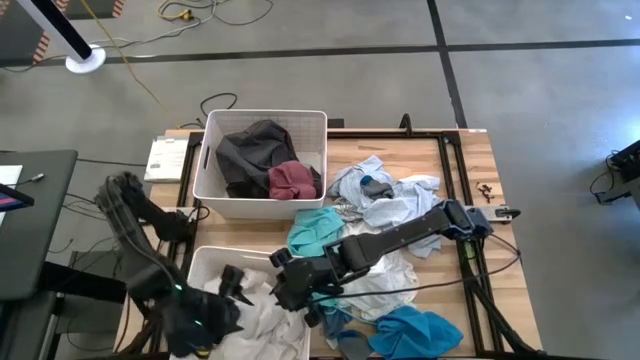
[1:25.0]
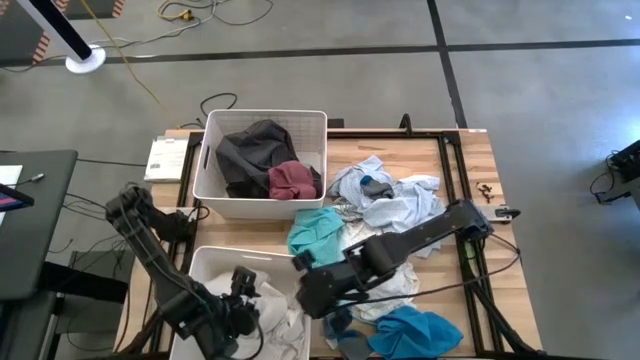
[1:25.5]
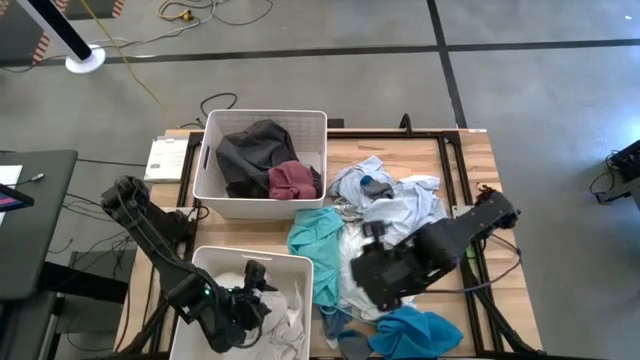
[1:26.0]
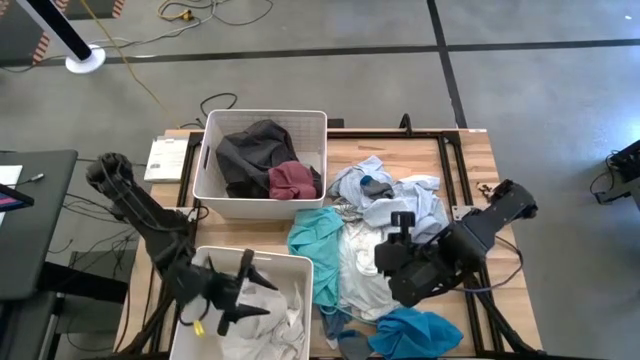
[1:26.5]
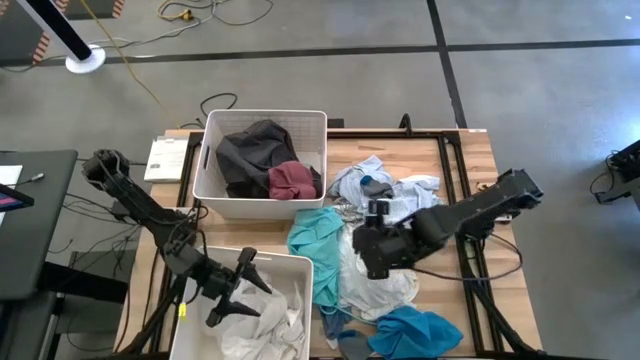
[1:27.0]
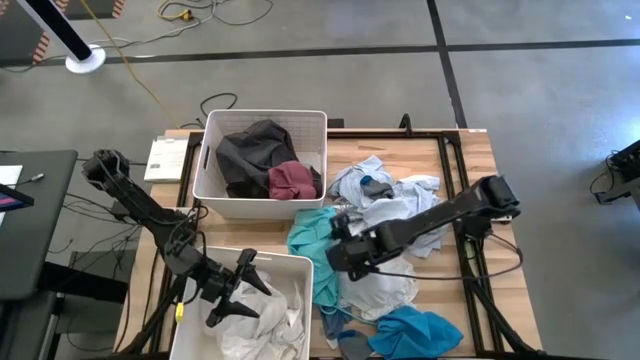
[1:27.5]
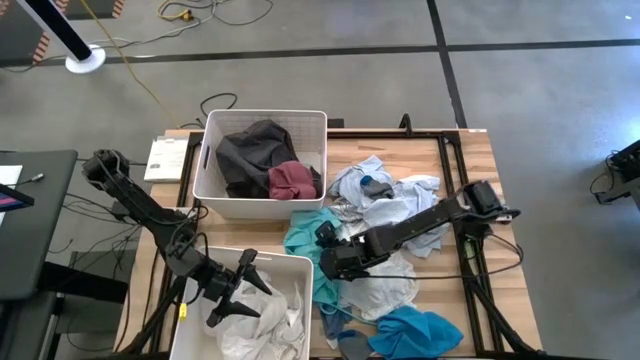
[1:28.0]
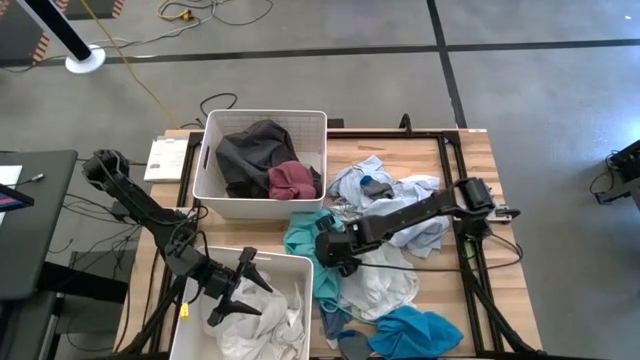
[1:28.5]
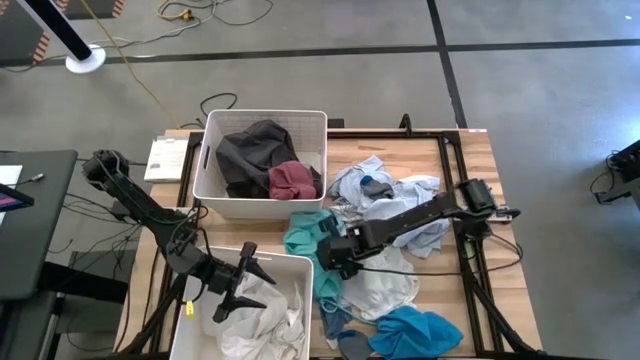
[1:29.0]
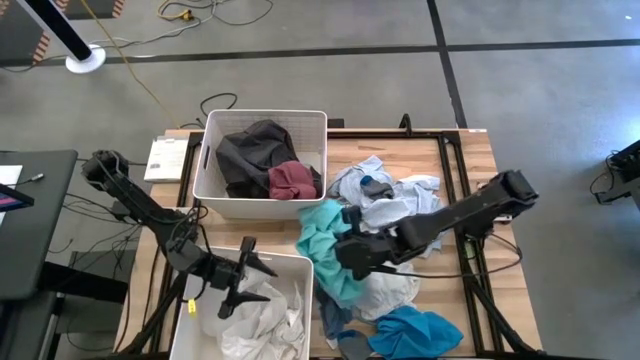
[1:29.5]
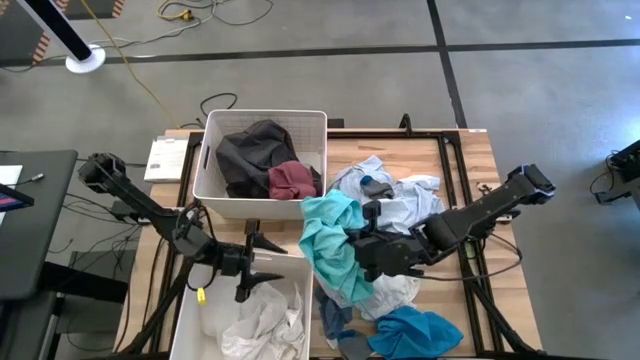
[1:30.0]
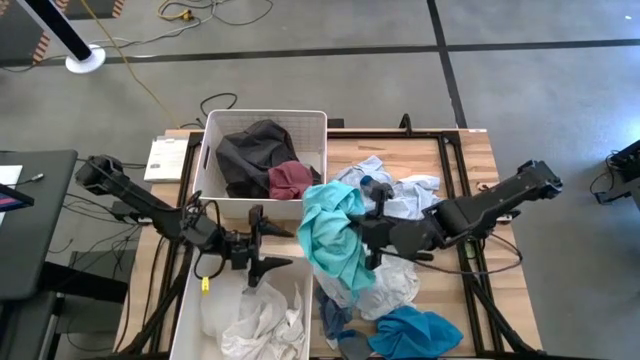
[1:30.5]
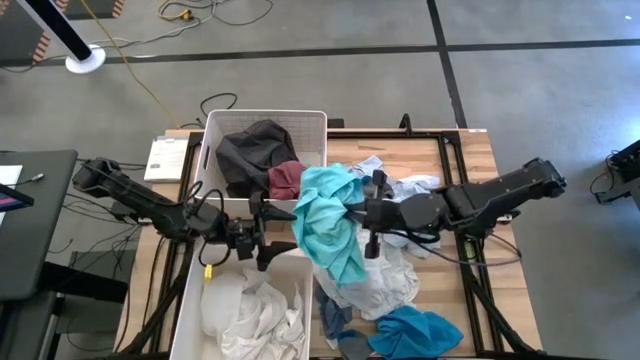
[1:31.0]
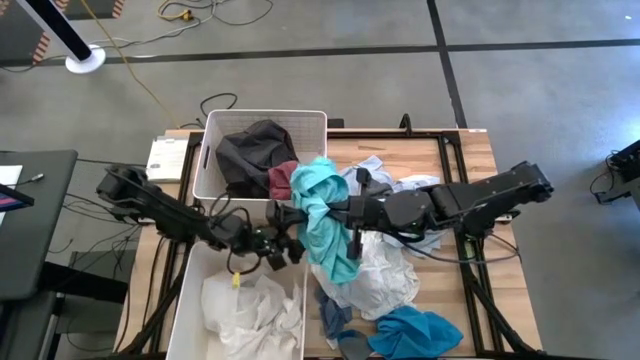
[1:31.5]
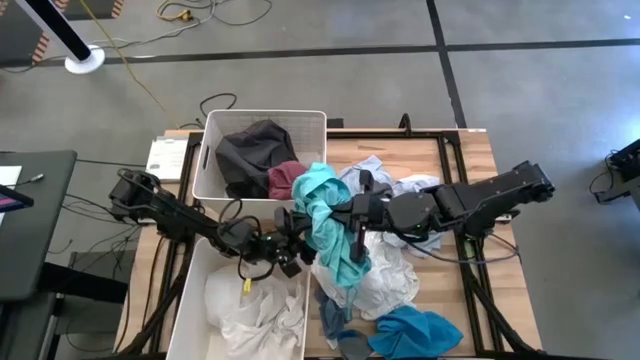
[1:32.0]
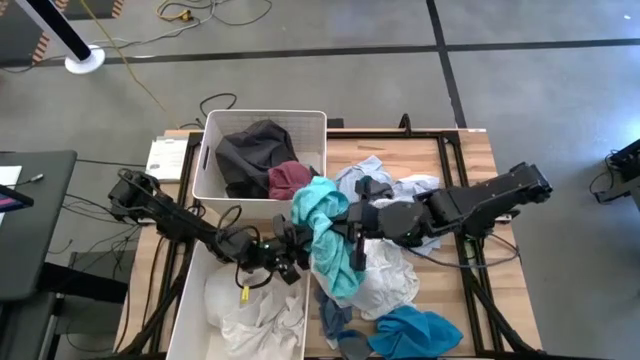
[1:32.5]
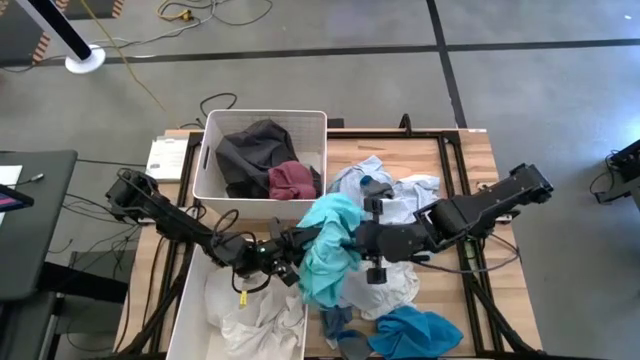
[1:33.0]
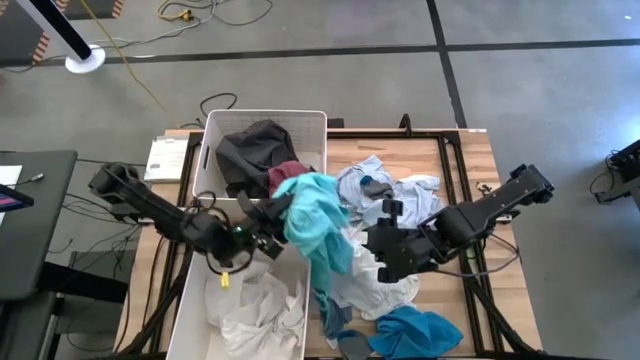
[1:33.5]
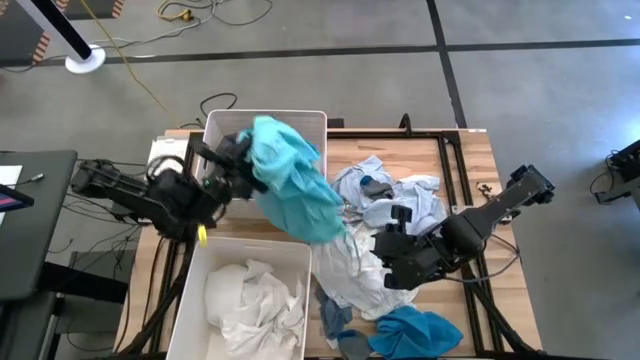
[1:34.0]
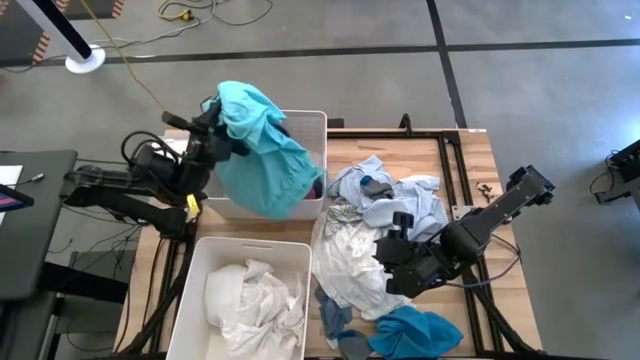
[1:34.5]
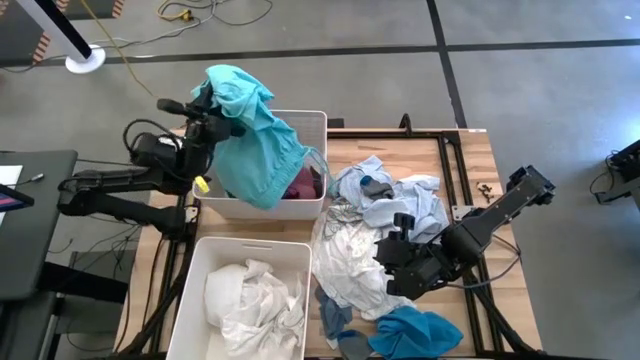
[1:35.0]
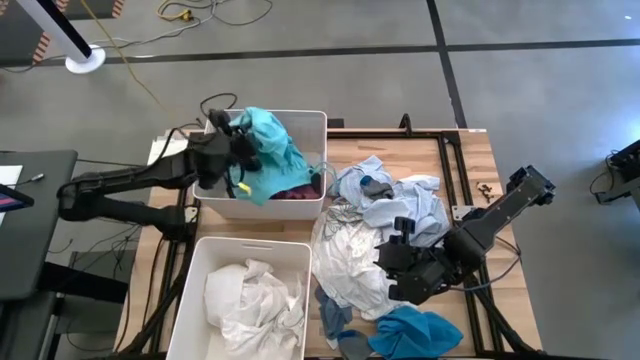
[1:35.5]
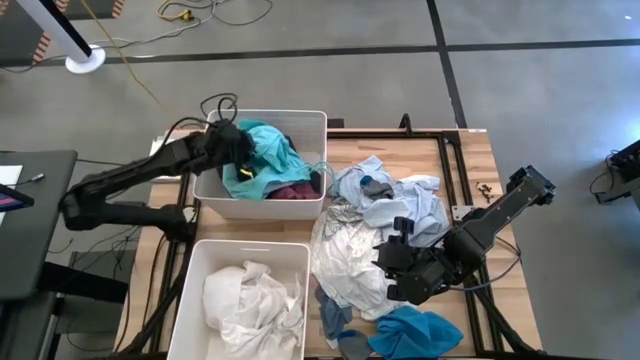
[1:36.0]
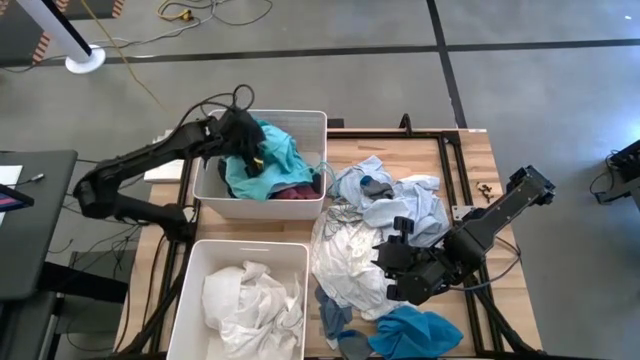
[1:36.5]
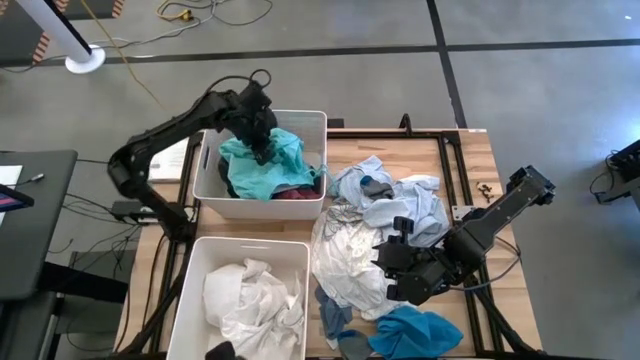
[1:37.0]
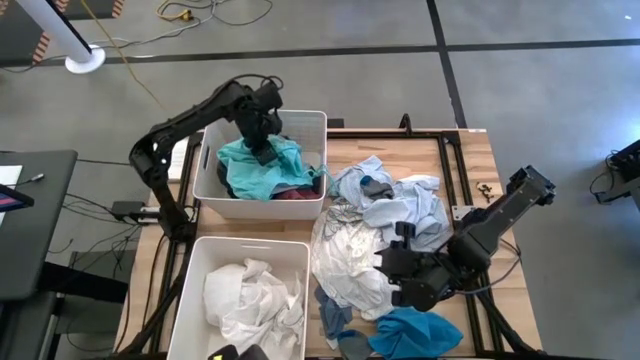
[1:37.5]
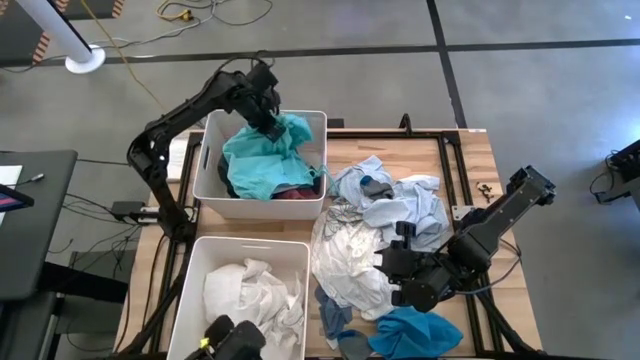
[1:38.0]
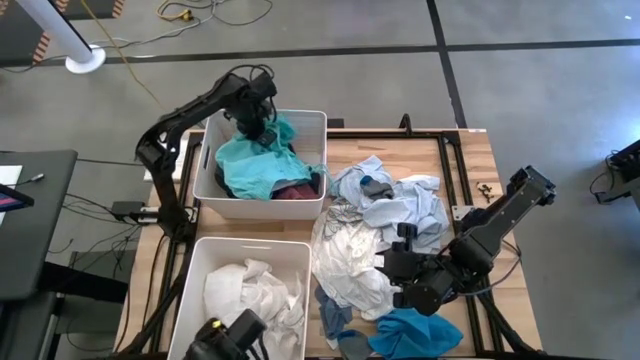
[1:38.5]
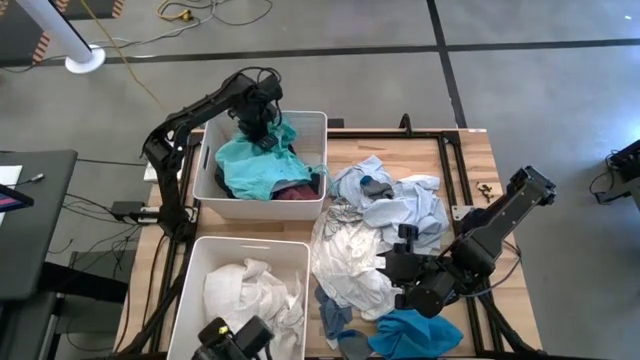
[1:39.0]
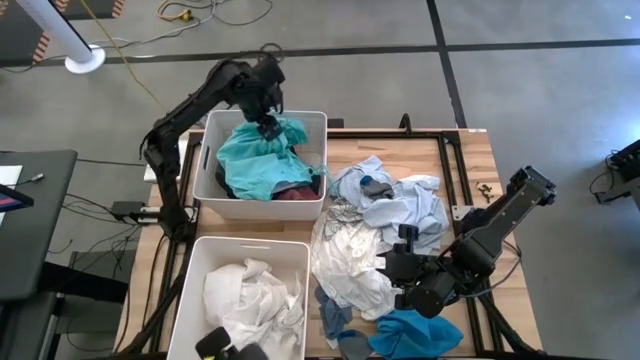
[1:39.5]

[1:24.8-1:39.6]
Task: Sort clothes
Put the light blue shorts into the top white laundry bin

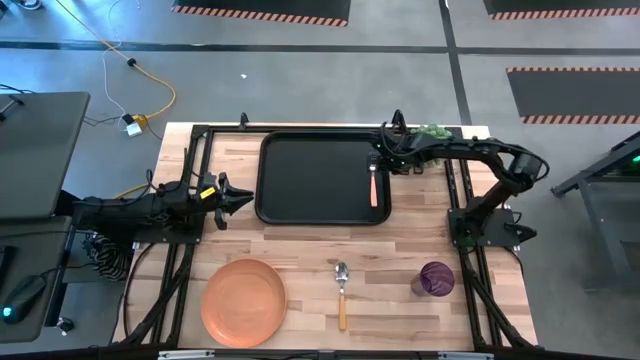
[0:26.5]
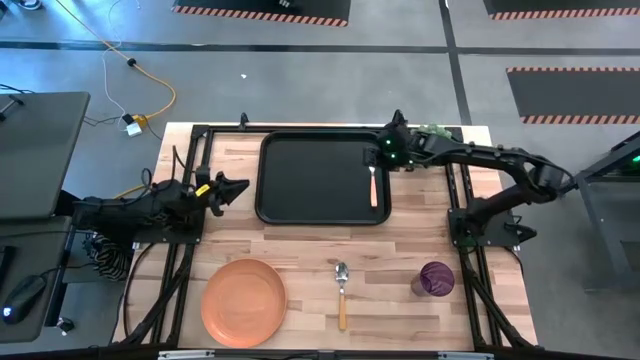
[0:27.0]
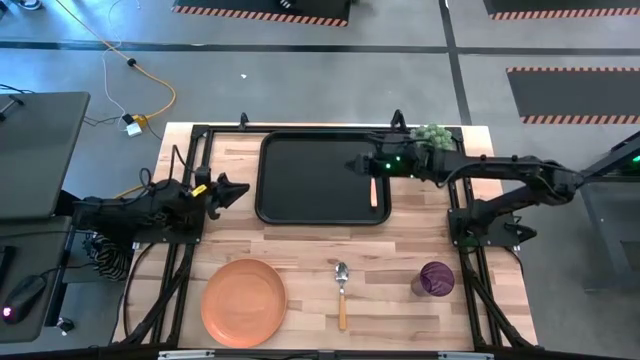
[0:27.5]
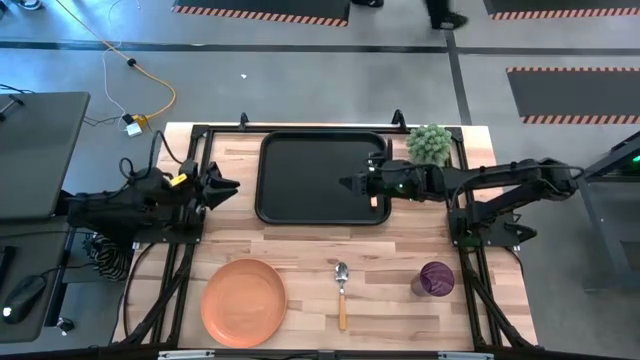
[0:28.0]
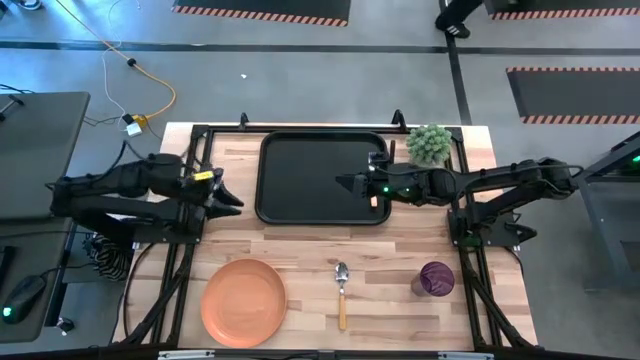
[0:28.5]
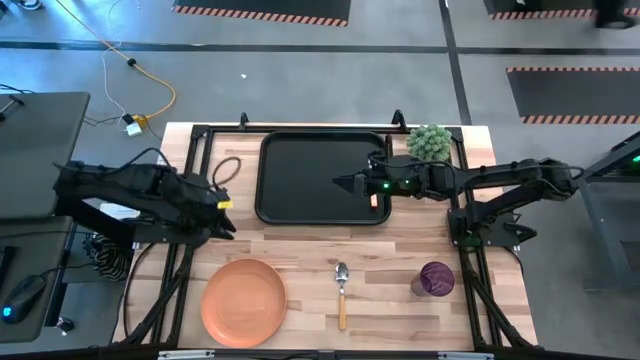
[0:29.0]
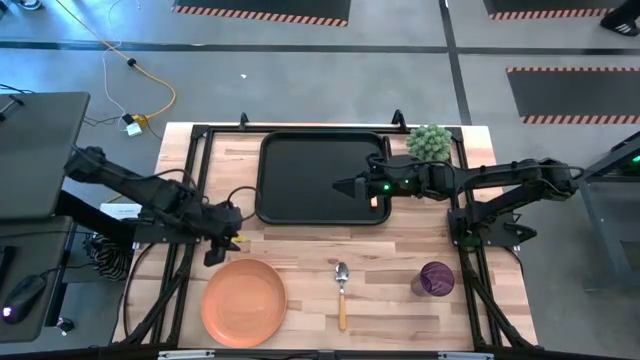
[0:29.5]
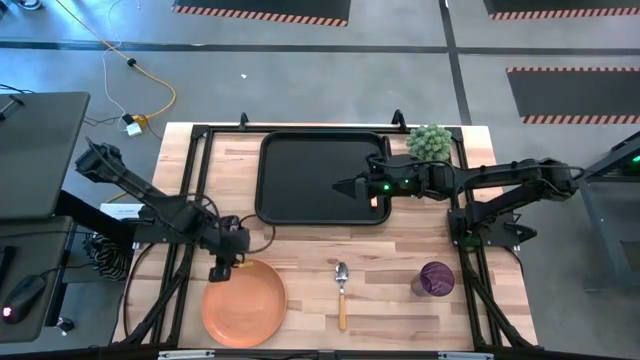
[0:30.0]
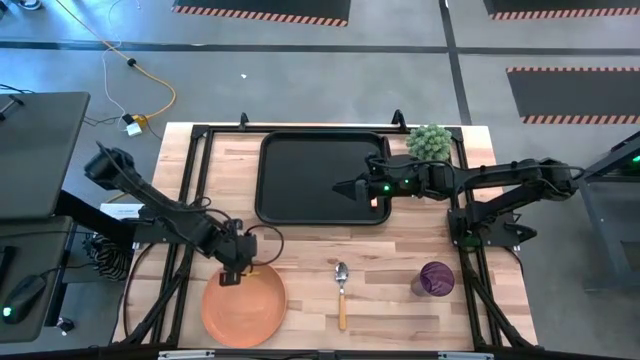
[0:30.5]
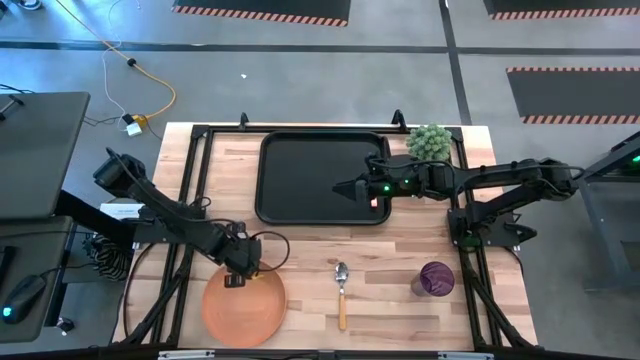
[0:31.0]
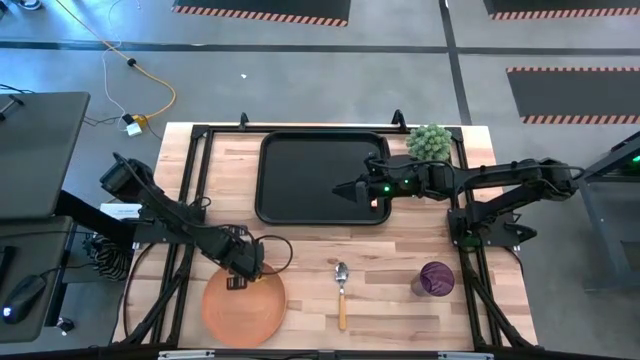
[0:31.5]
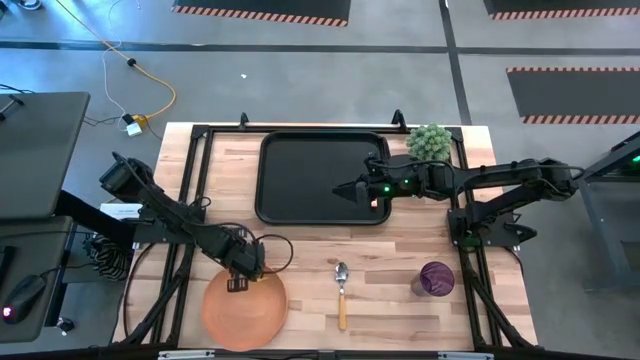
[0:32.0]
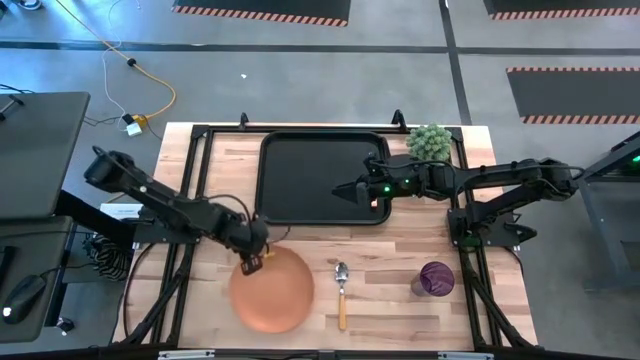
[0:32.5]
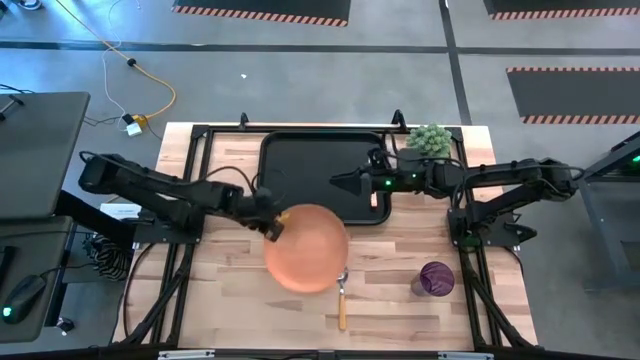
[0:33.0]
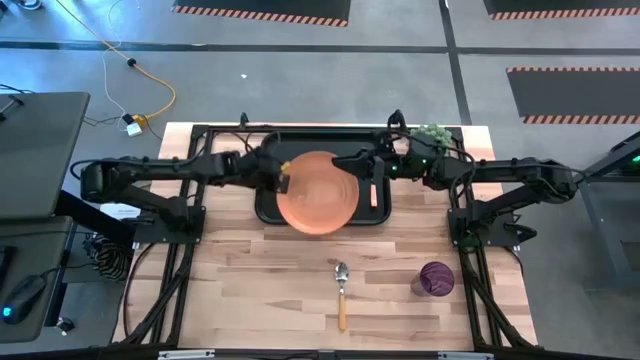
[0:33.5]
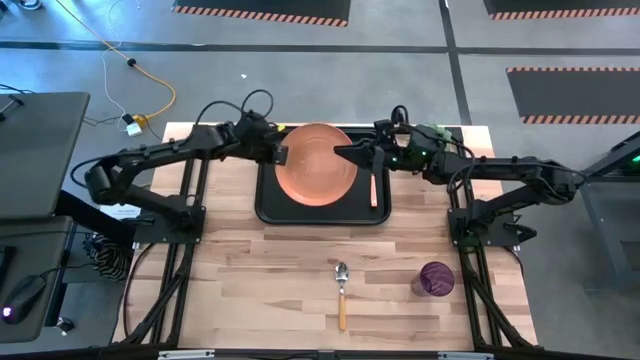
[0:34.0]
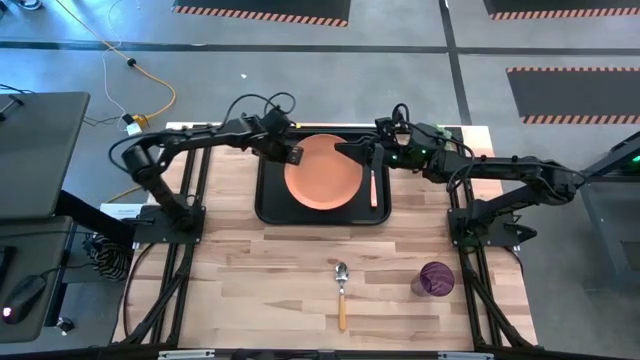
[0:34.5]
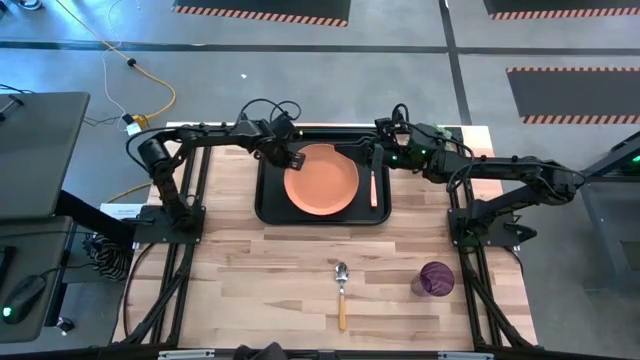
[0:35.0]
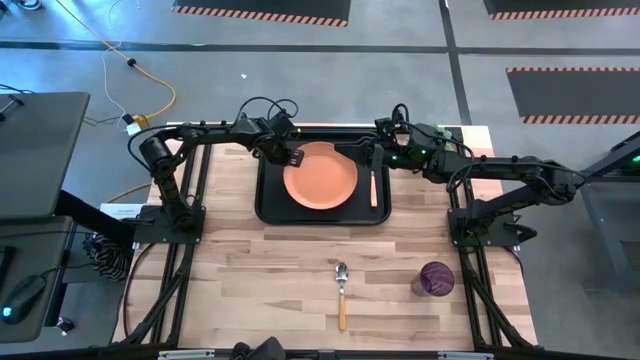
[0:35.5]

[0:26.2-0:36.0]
Task: Pick and place plate/cup/fork/spoon on tray
Put the orange plate on the black serving tray to the left of the light orange fork
